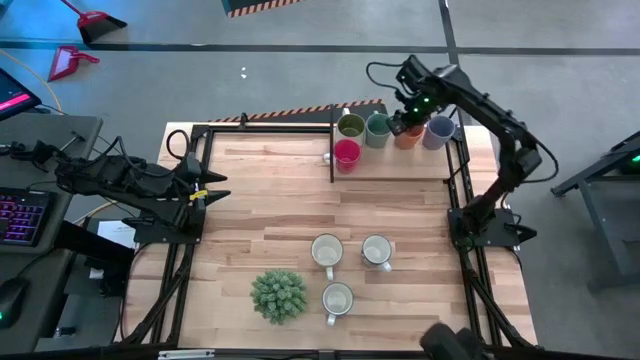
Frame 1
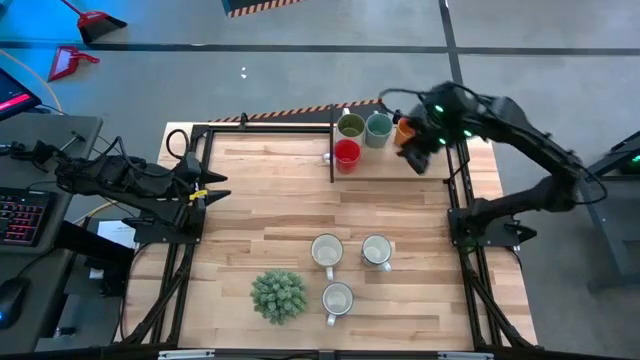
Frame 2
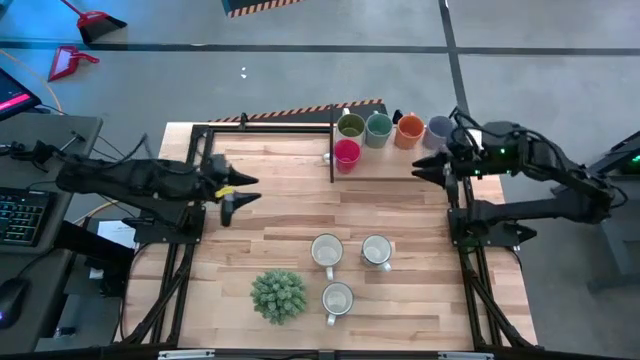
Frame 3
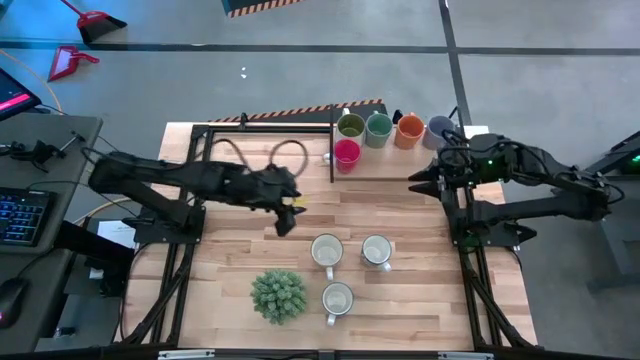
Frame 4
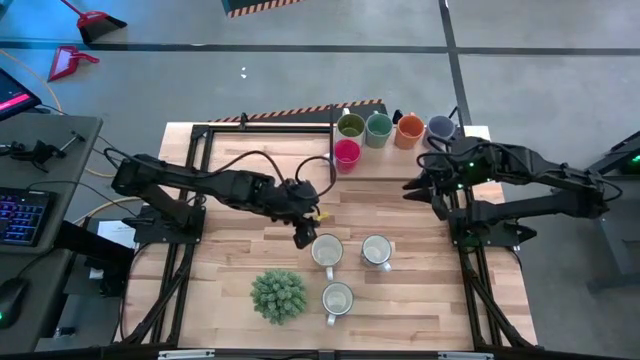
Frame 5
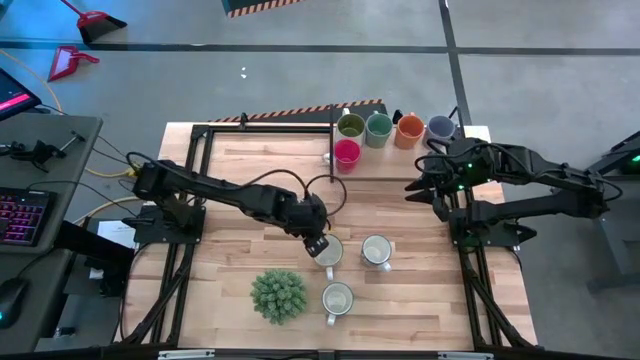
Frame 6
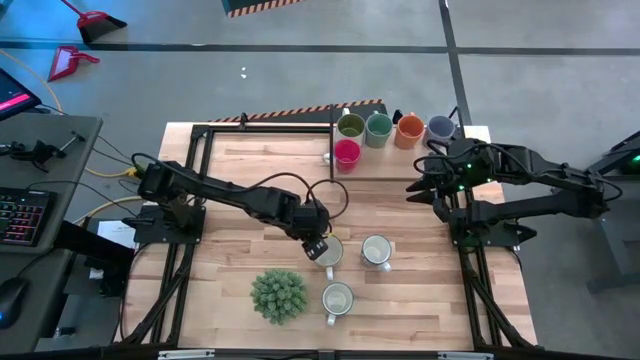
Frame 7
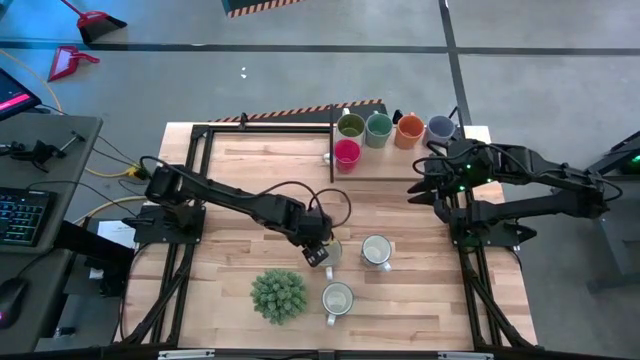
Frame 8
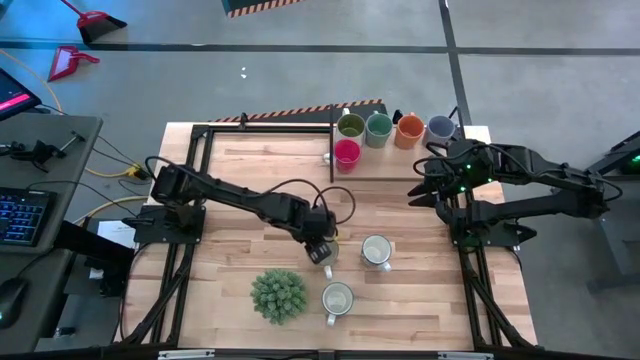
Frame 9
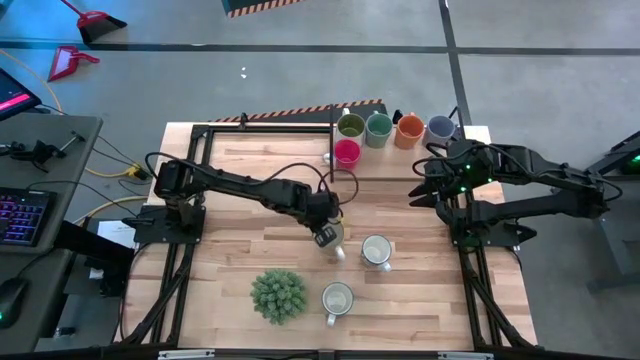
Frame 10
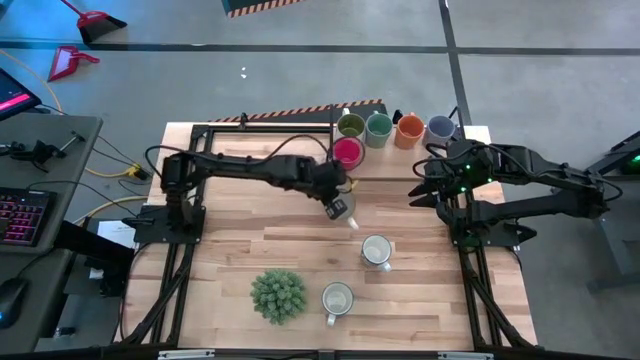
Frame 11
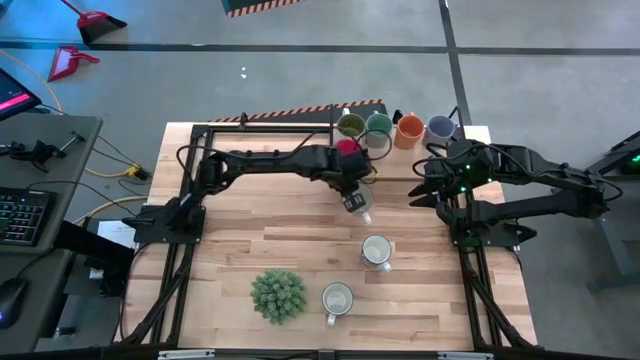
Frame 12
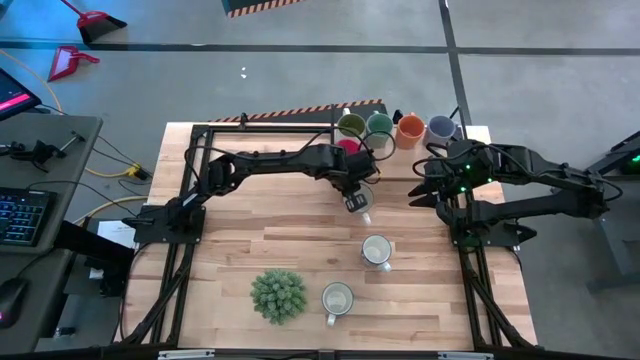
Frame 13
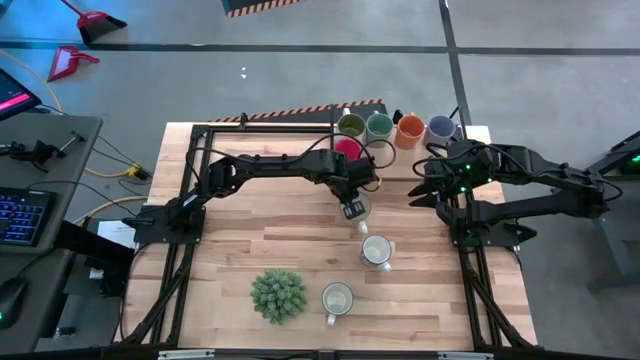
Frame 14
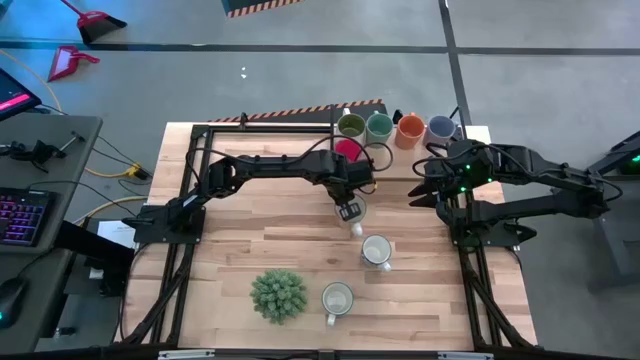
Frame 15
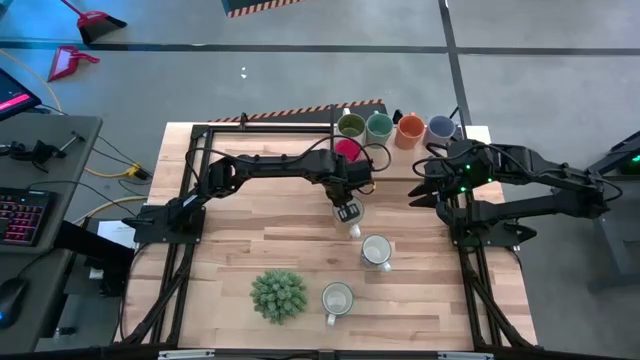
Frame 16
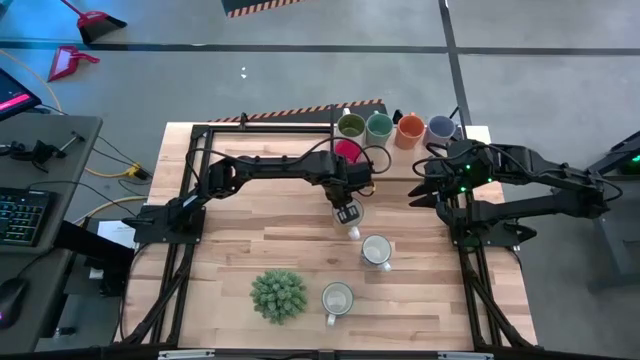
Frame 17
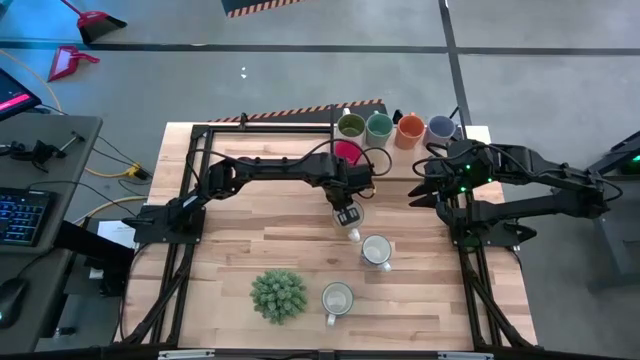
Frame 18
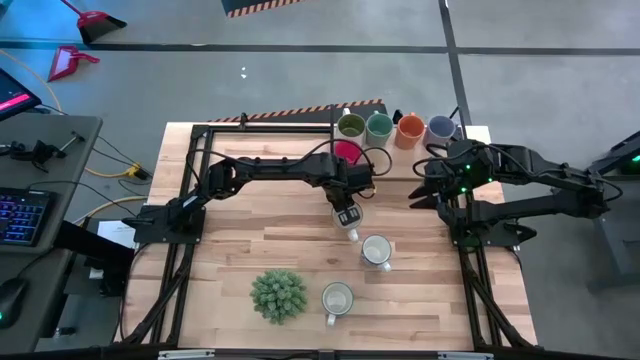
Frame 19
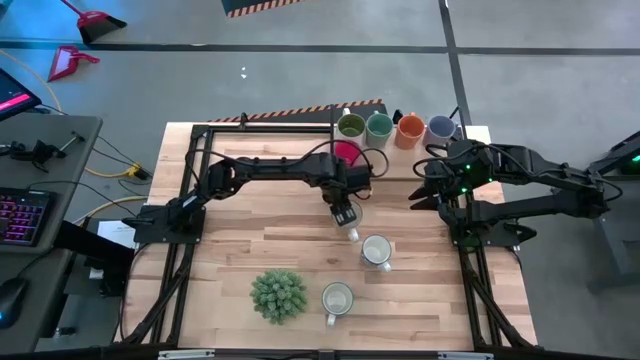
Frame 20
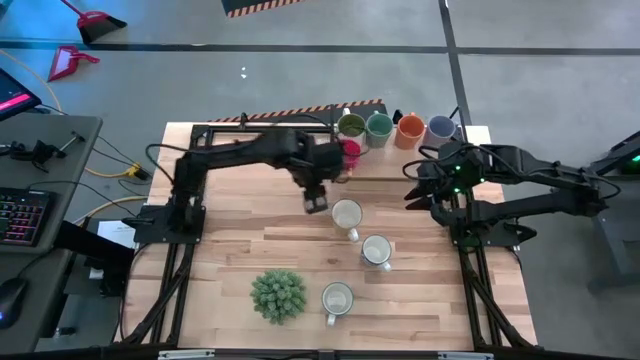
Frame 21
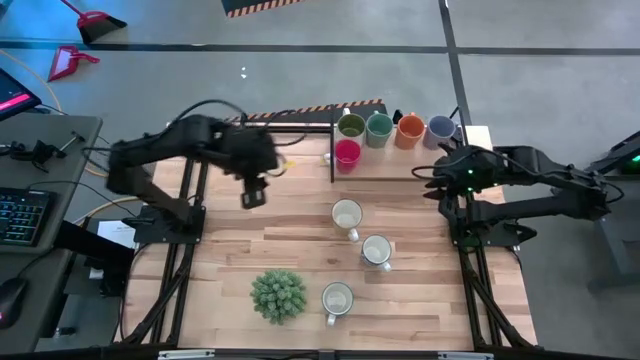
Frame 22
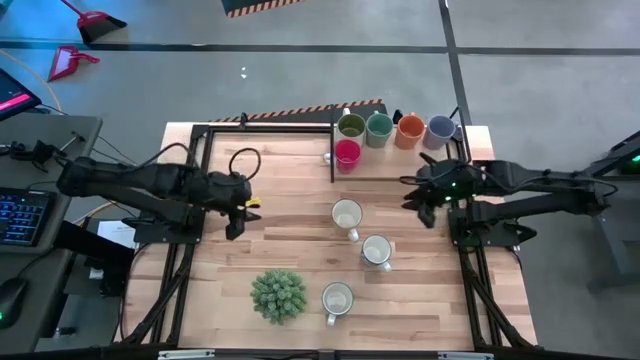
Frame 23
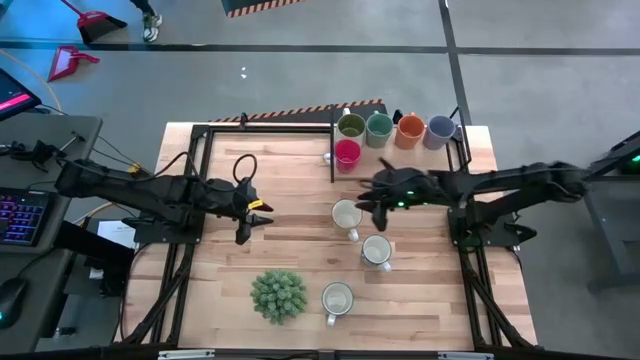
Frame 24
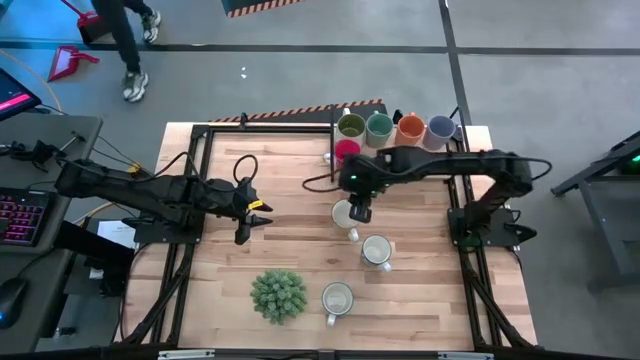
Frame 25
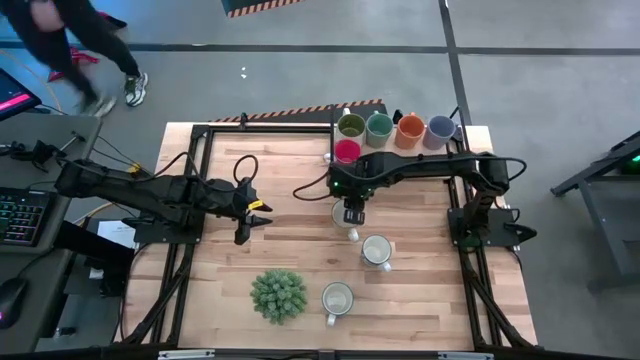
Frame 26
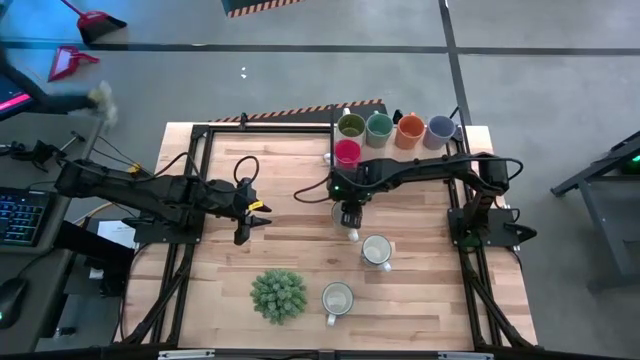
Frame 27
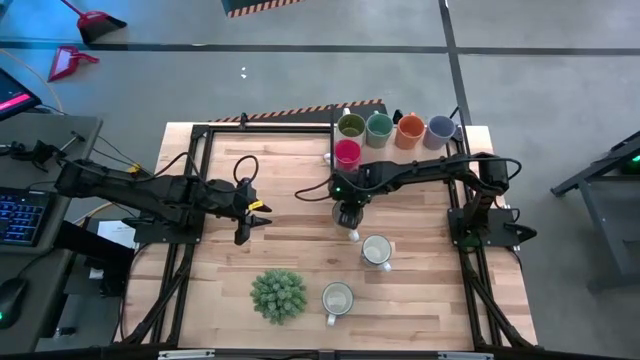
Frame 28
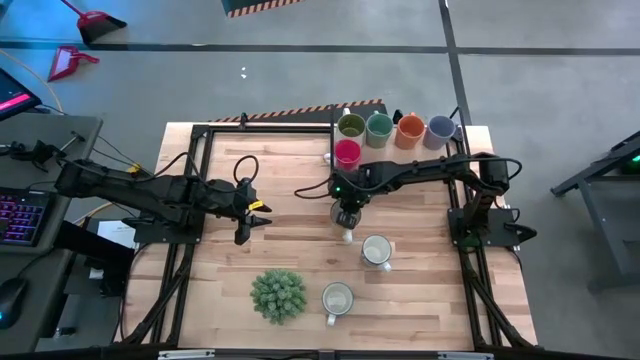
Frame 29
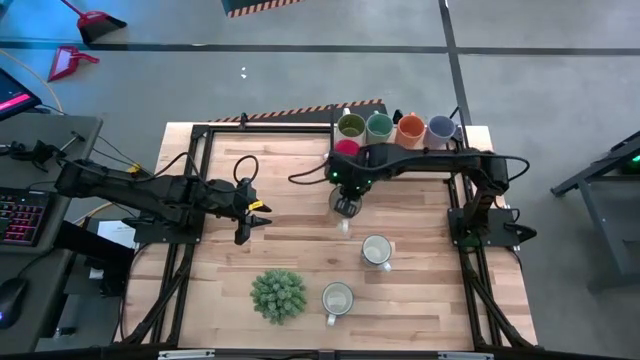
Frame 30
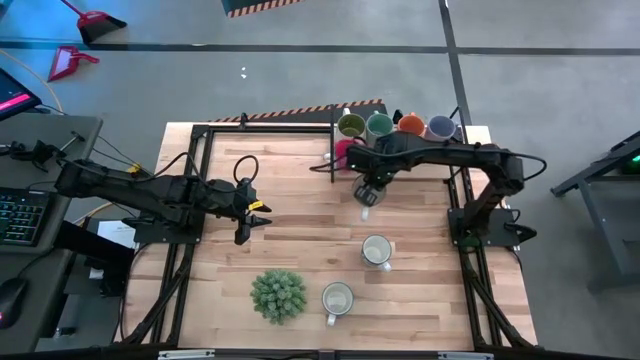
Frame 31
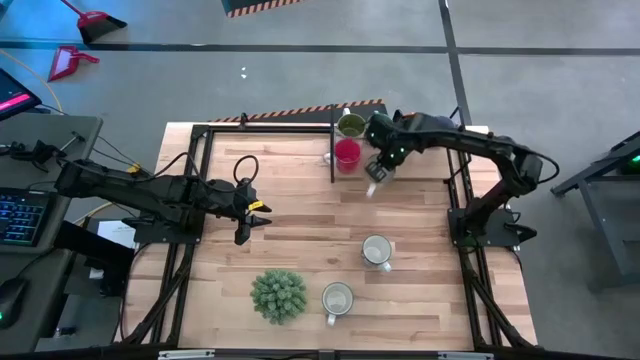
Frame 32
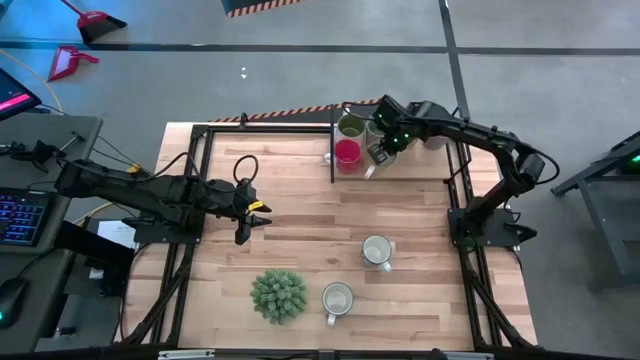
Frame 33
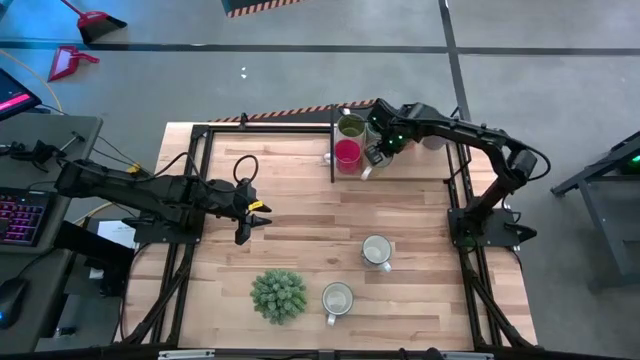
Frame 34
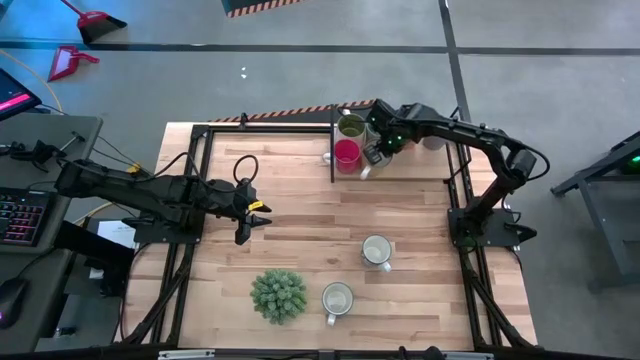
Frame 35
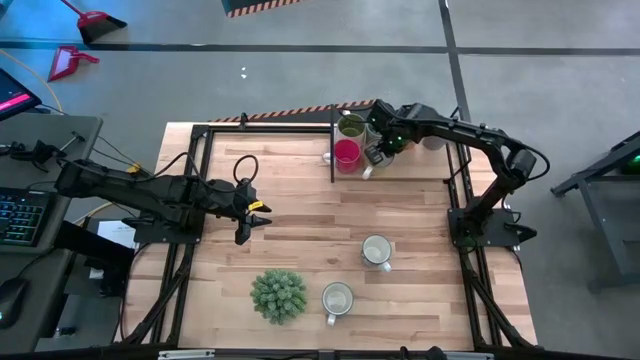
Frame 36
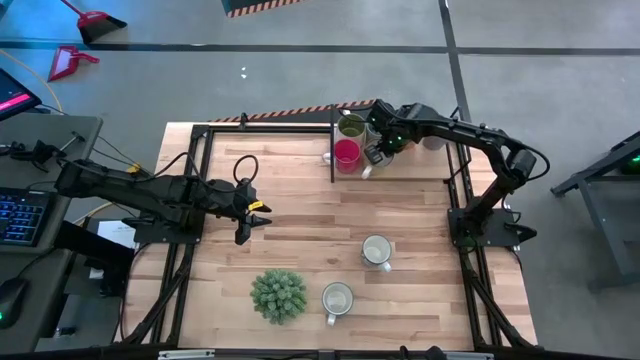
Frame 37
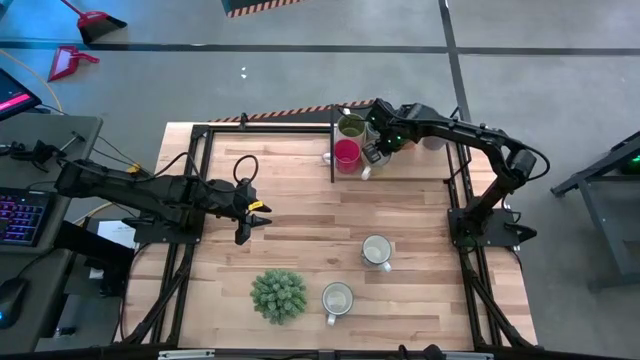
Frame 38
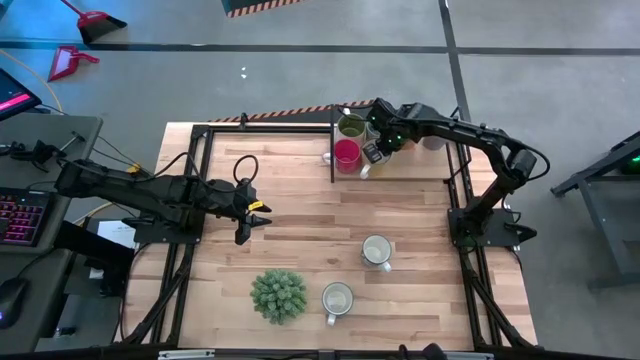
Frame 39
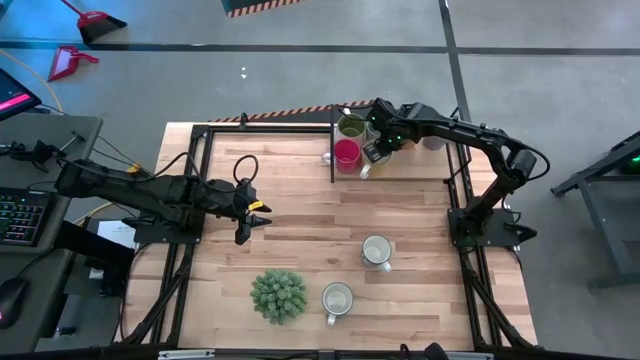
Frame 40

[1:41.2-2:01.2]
Task: Place coffee mugs
Put the yellow mug on the shelf
